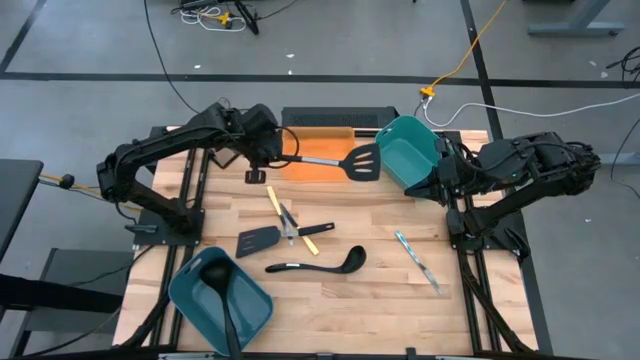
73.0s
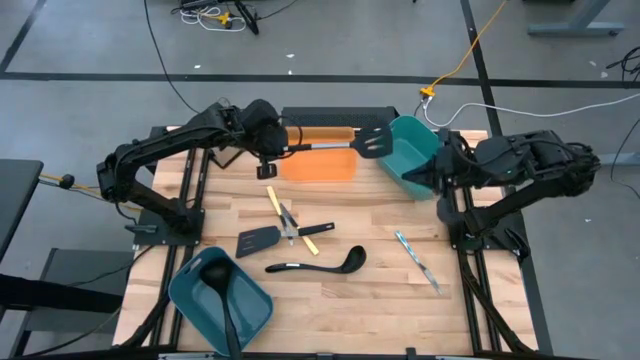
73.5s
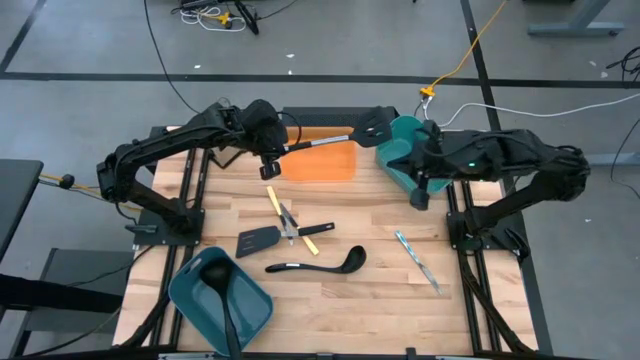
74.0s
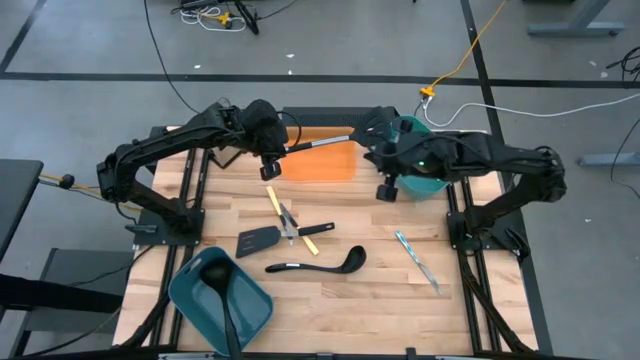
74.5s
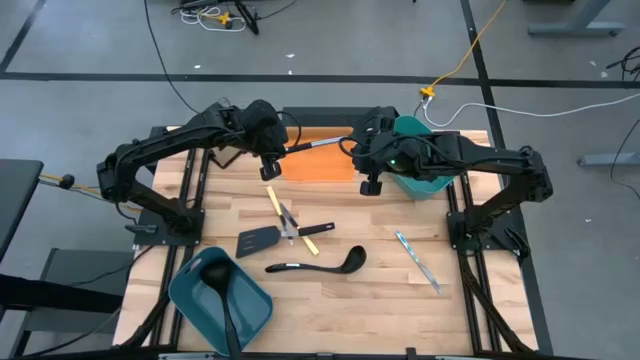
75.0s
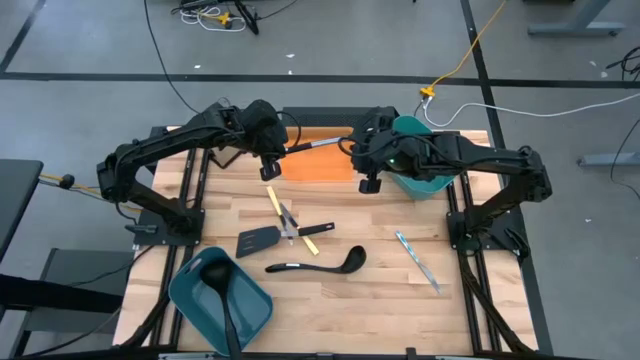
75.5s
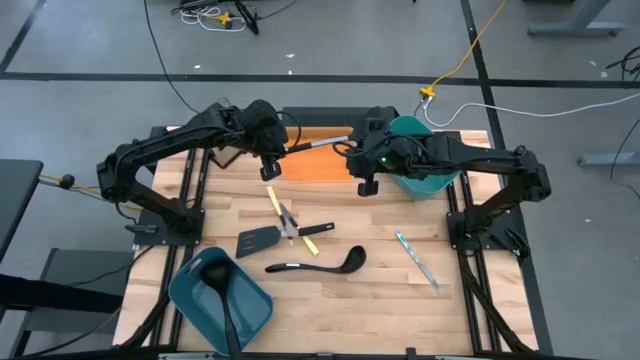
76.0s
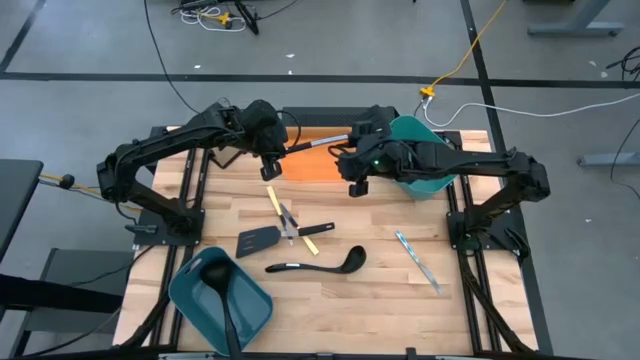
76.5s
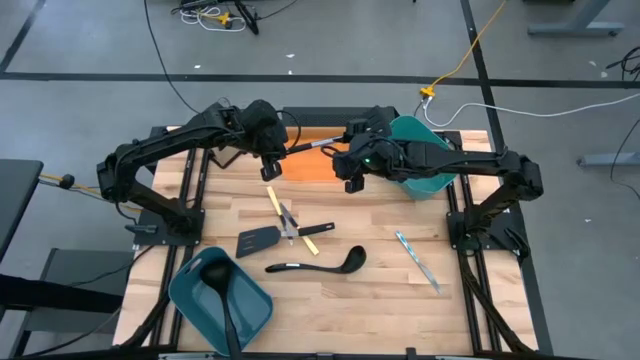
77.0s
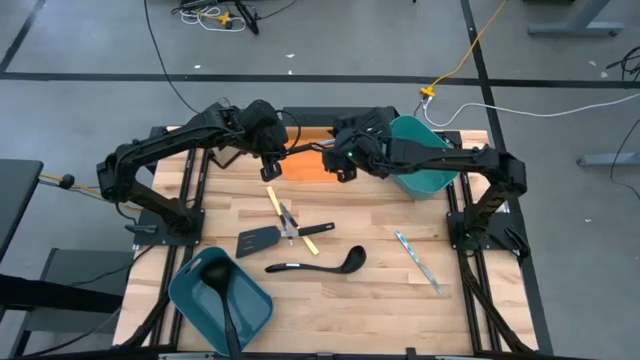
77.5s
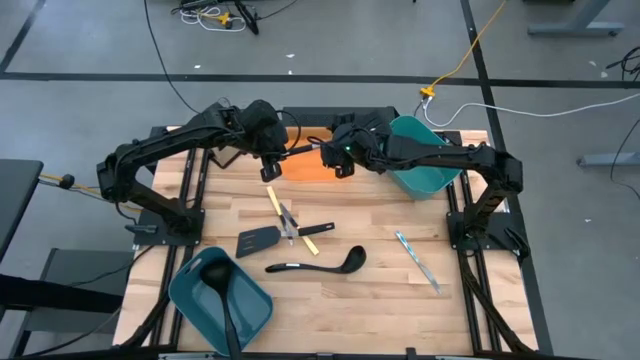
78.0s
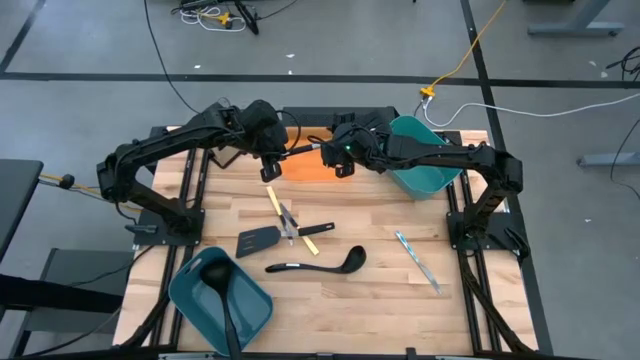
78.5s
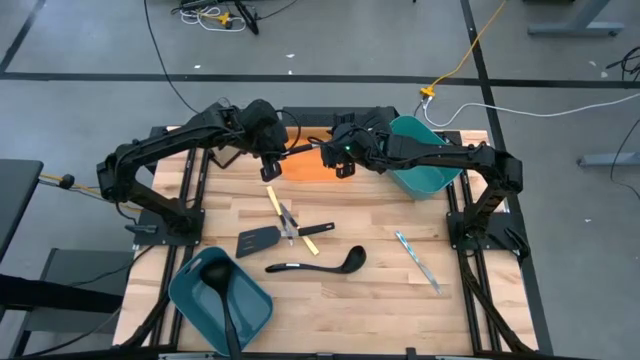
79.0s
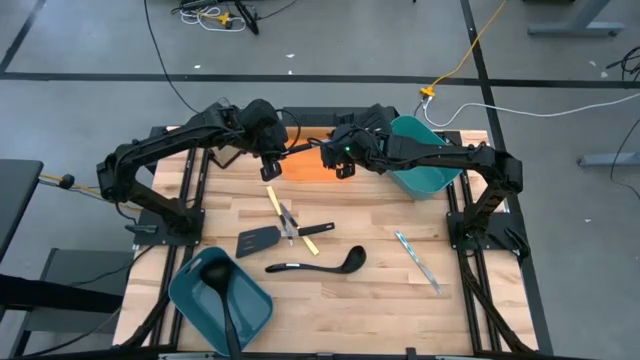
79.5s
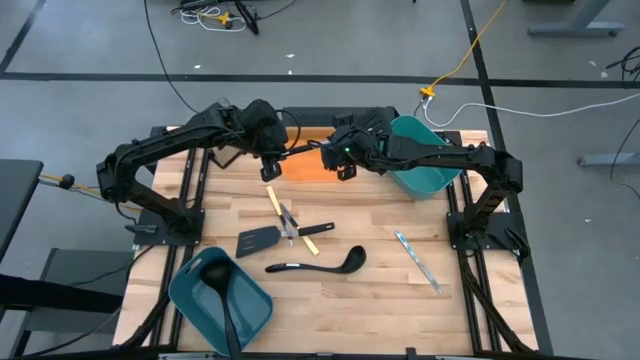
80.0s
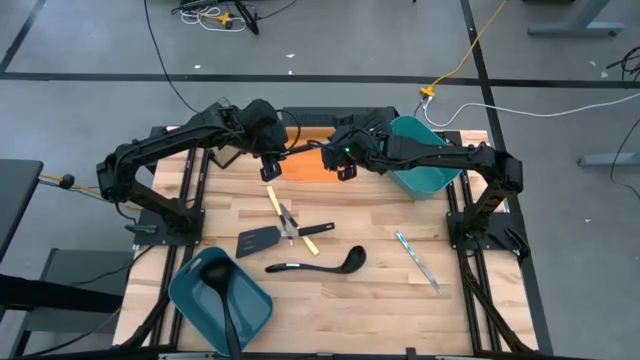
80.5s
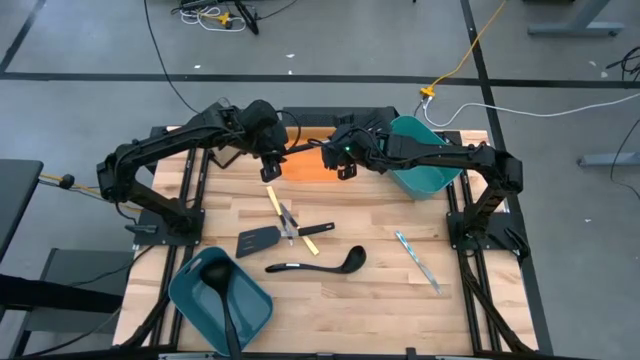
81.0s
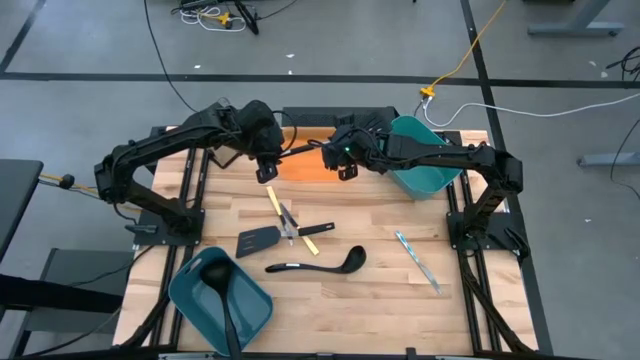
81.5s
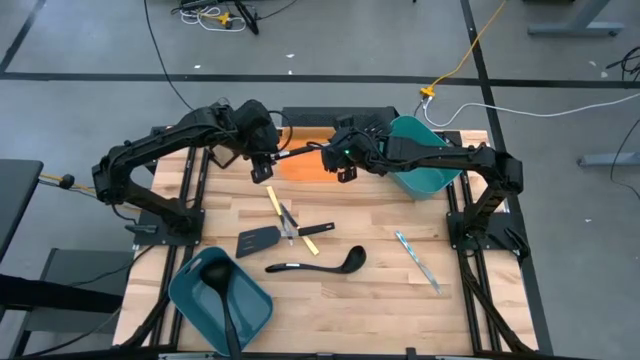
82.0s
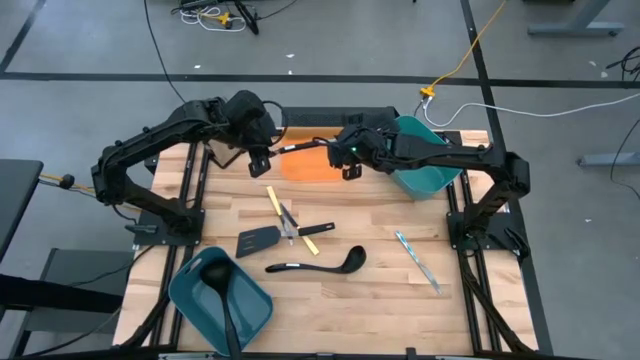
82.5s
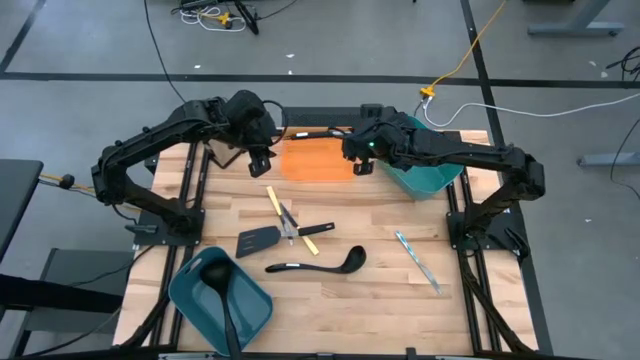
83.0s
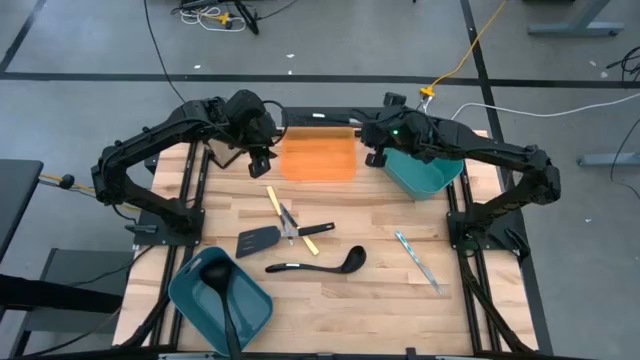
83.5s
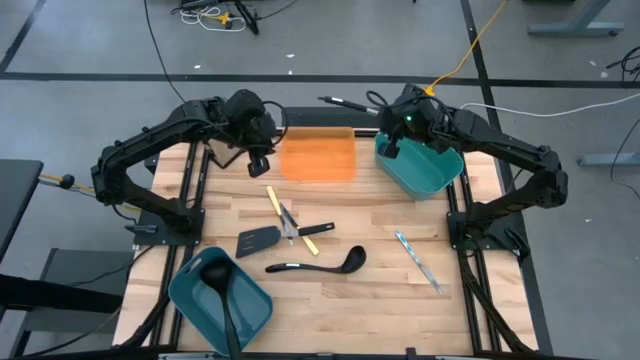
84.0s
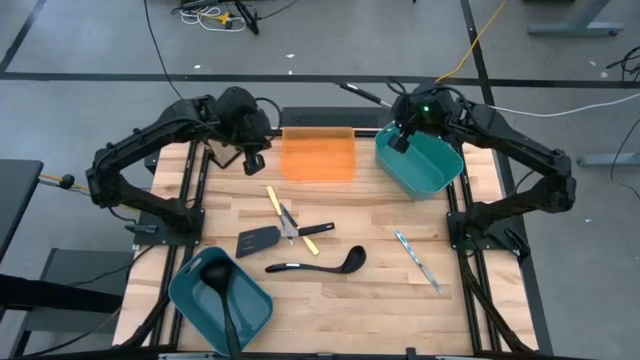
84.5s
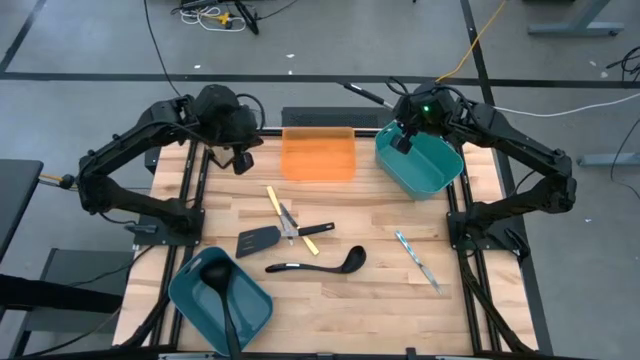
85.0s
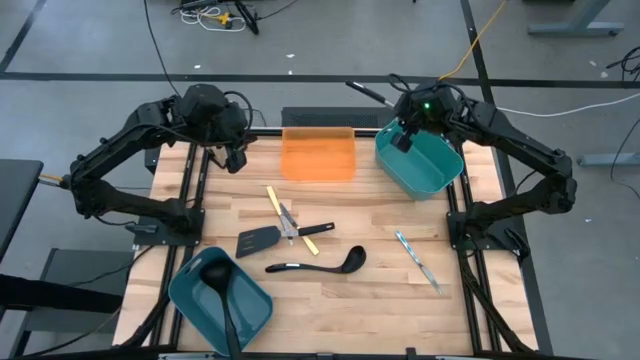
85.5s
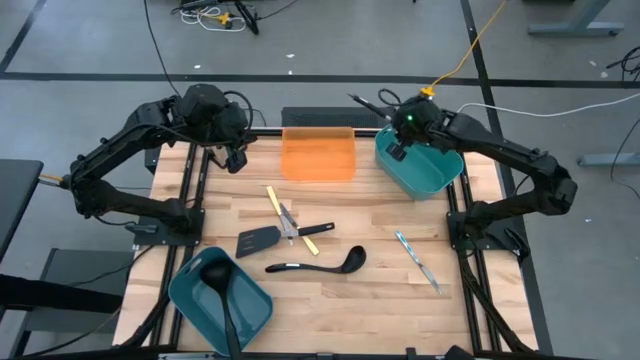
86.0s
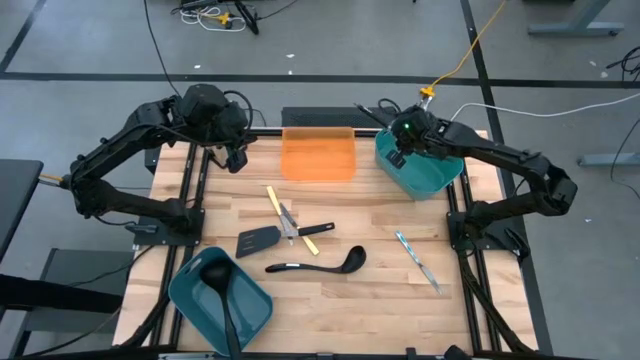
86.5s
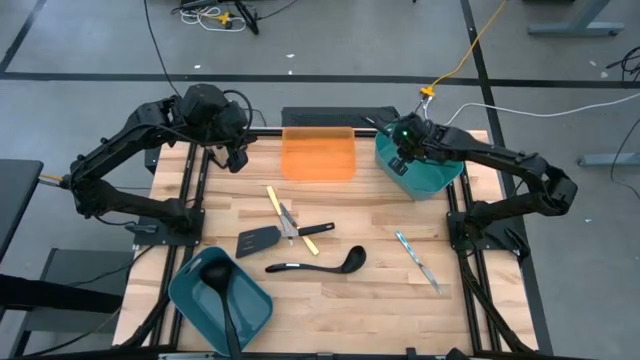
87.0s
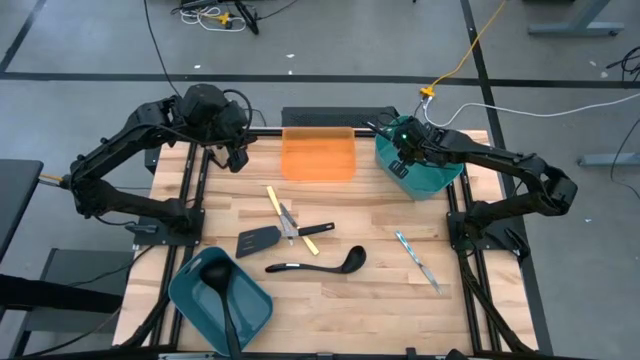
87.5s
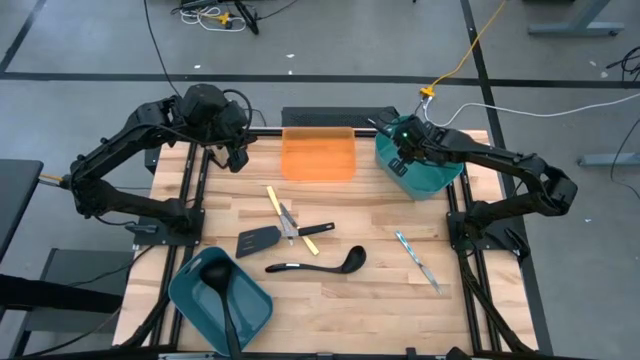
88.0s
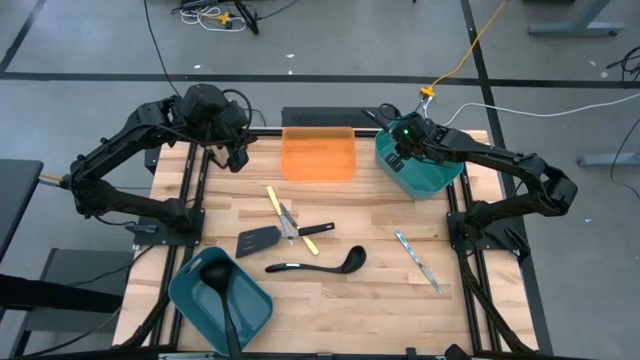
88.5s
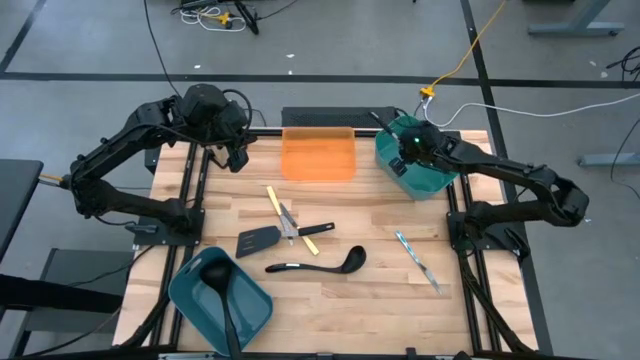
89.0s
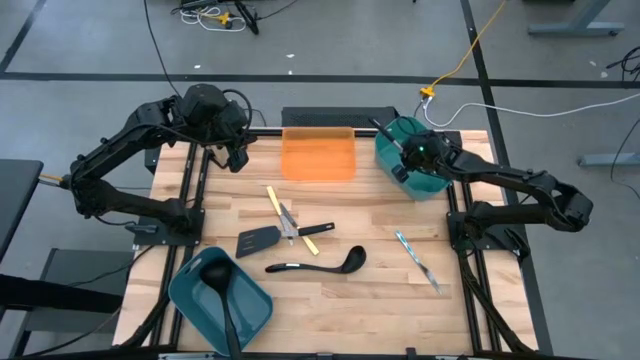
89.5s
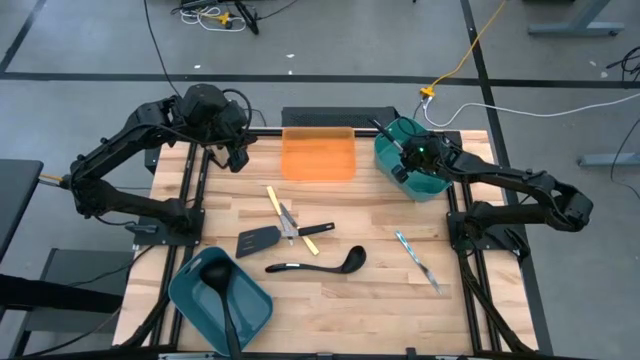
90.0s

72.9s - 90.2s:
Task: Pick & Place Kitchen Items
Put the top black spatula into the green bin

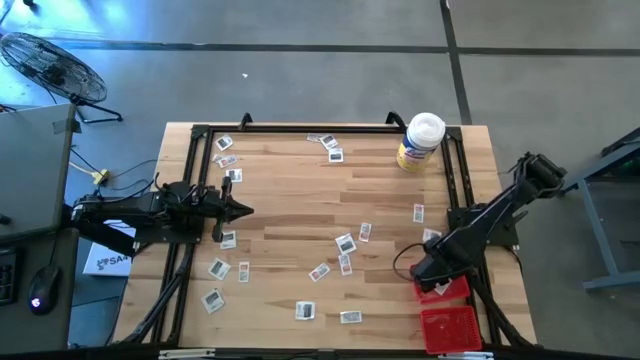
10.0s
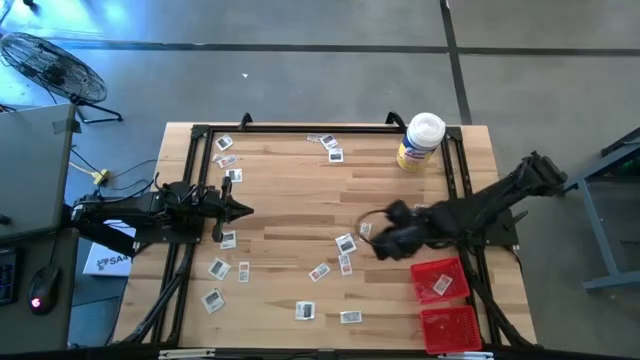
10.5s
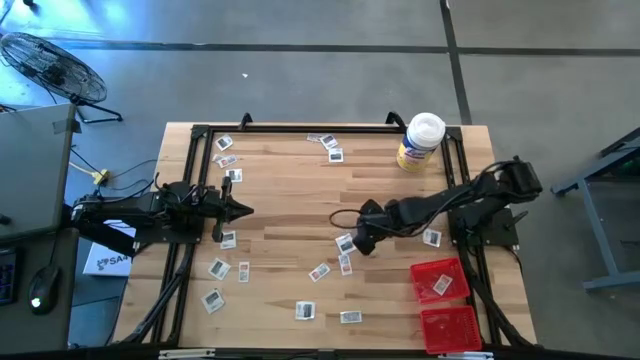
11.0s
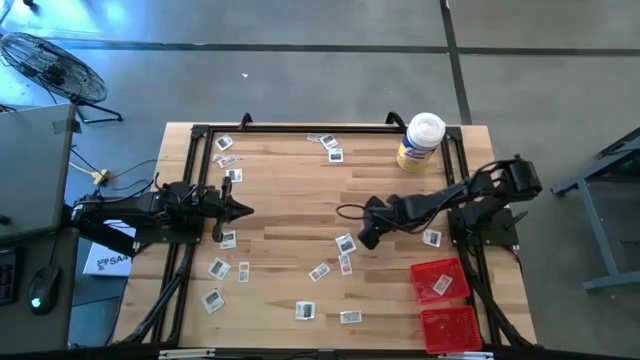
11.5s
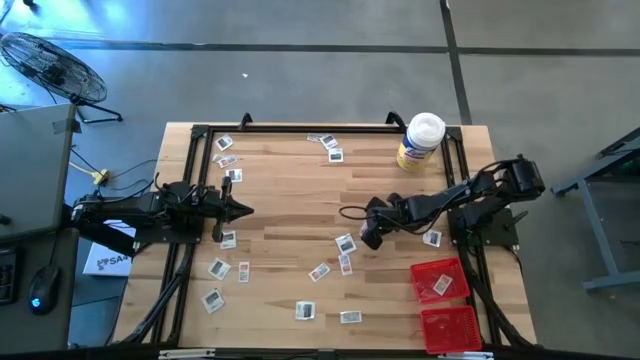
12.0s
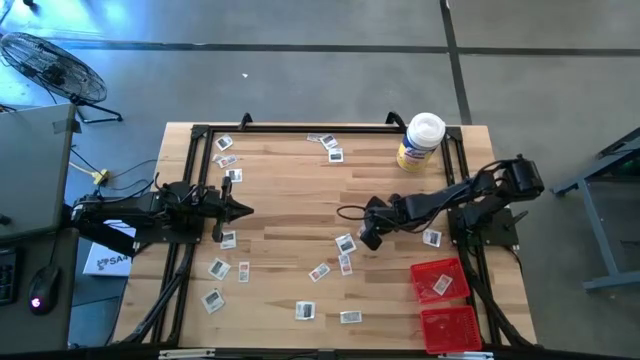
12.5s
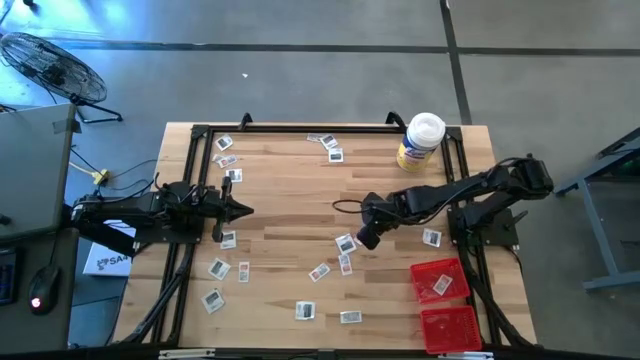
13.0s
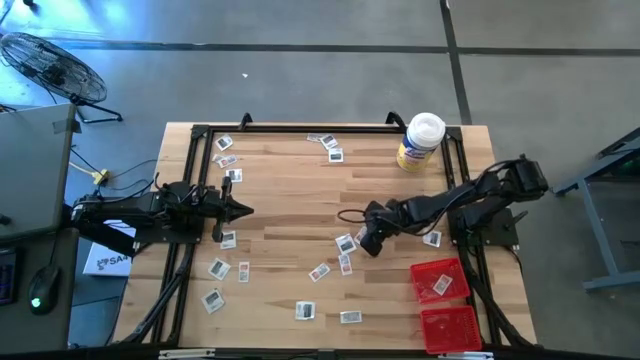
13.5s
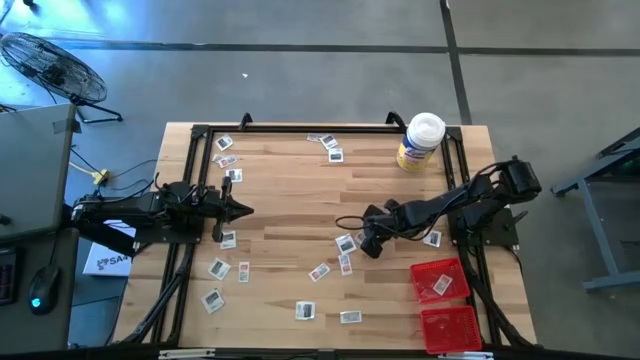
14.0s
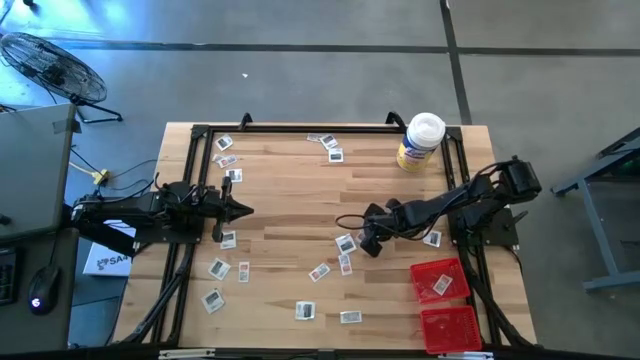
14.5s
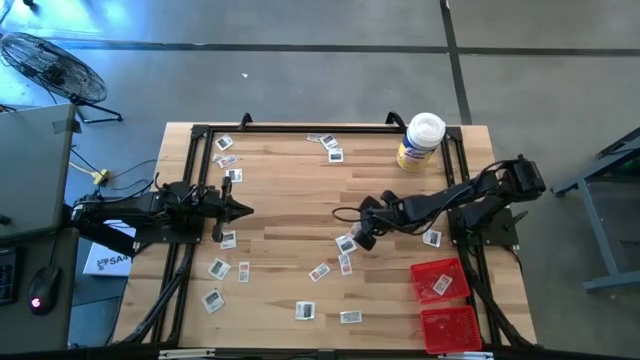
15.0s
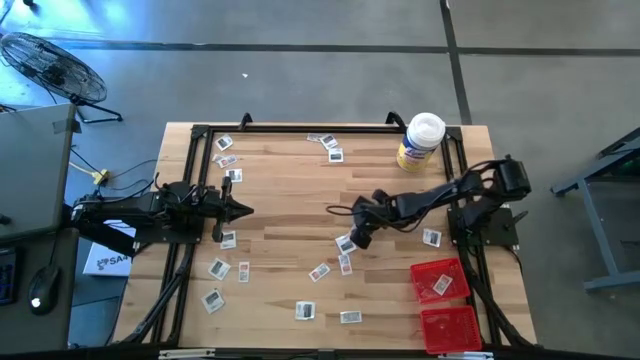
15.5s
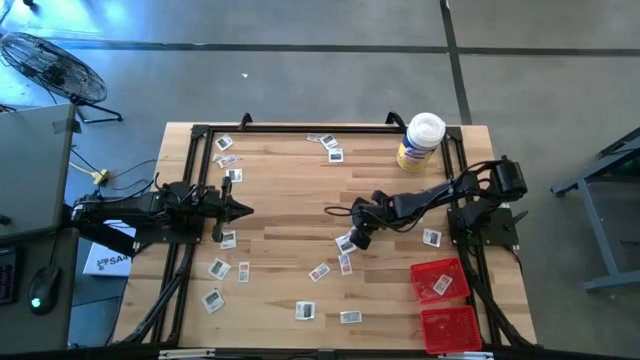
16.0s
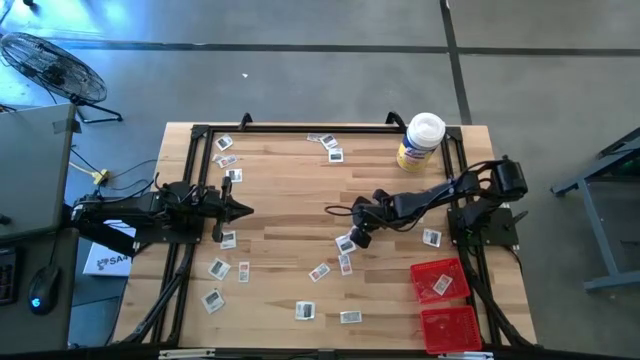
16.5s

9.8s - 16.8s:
Task: Pick & Place First Aid Supplies
Put the white ointment pack into the top red bin
